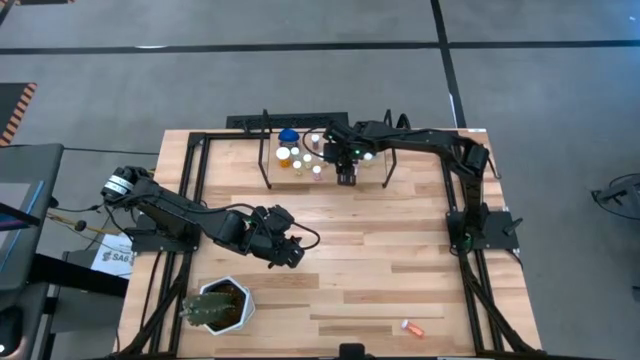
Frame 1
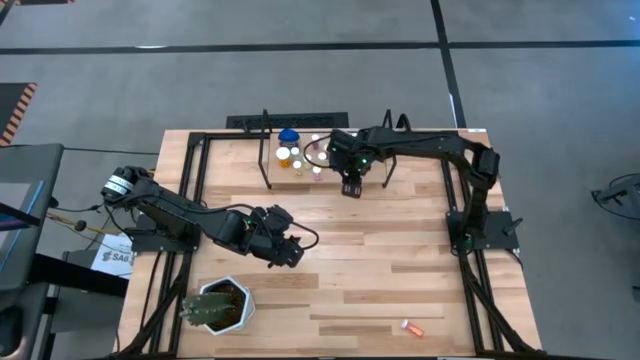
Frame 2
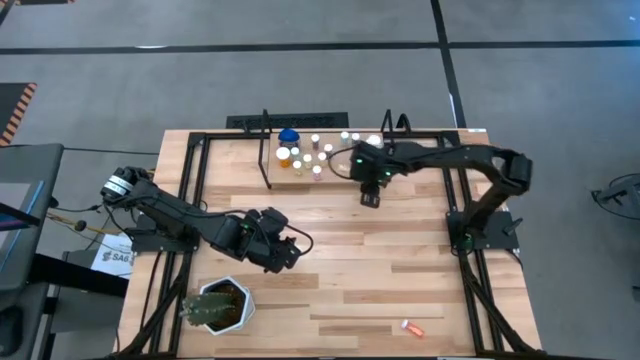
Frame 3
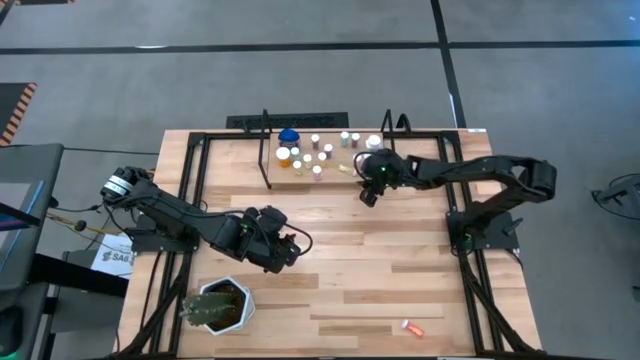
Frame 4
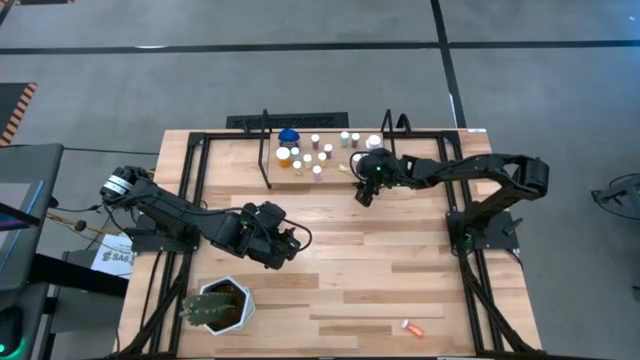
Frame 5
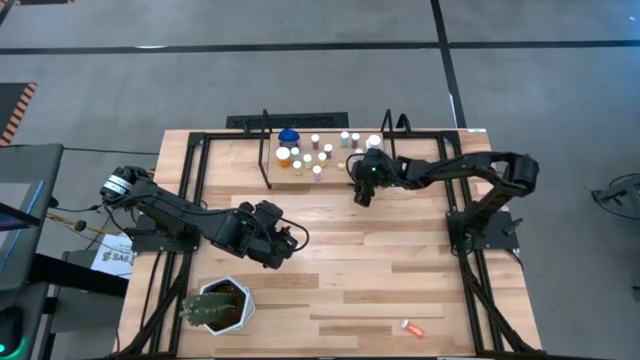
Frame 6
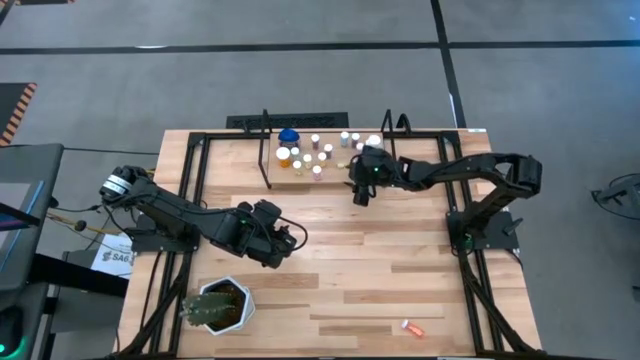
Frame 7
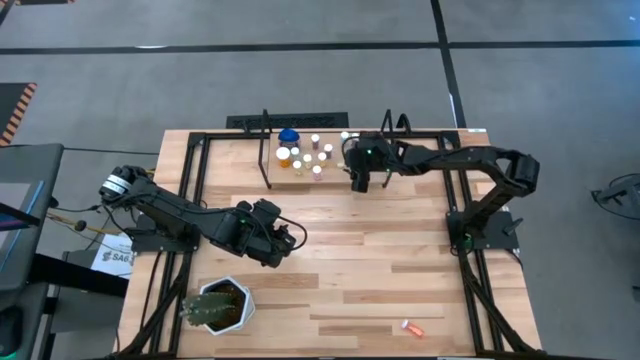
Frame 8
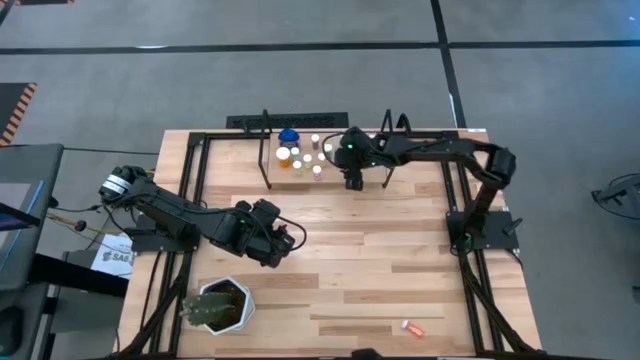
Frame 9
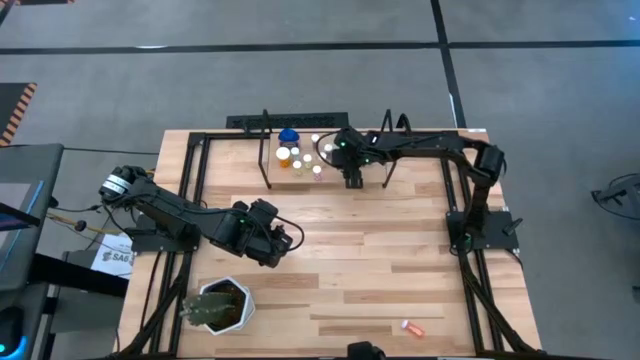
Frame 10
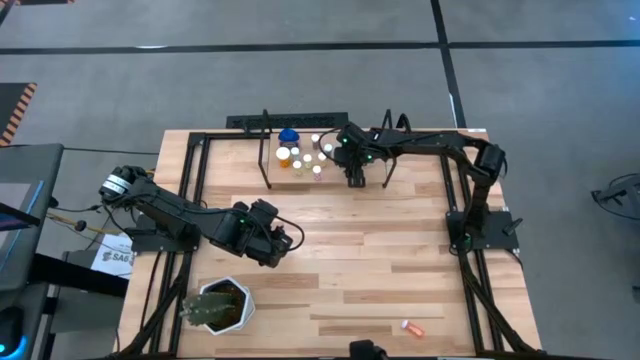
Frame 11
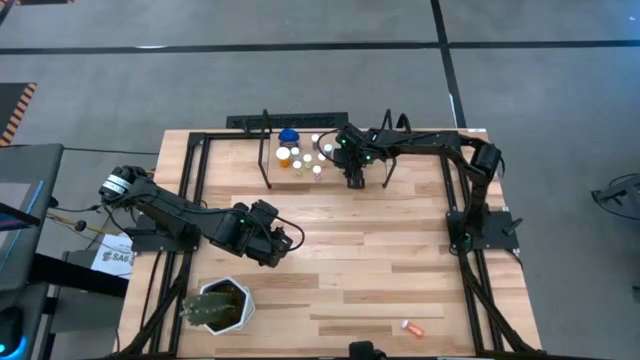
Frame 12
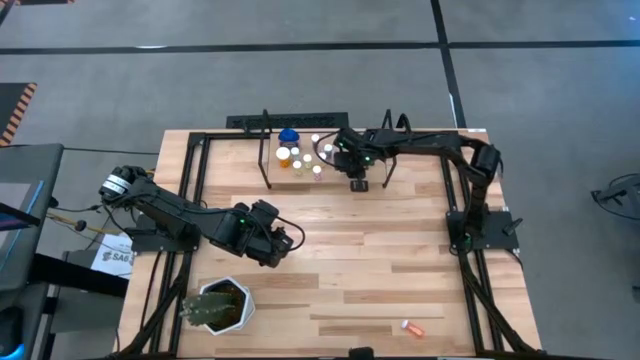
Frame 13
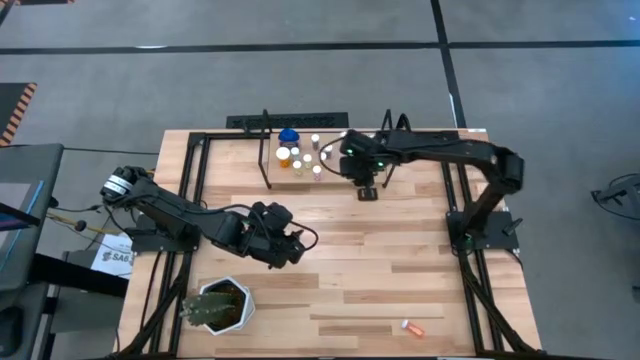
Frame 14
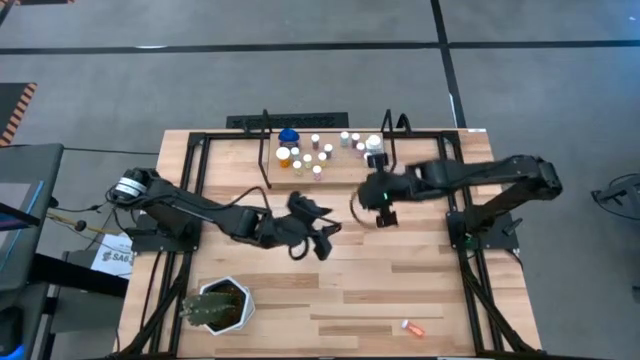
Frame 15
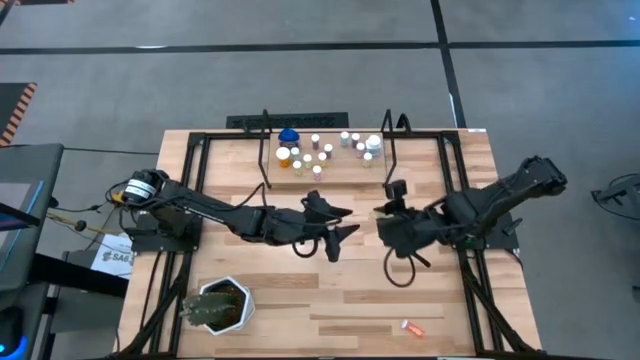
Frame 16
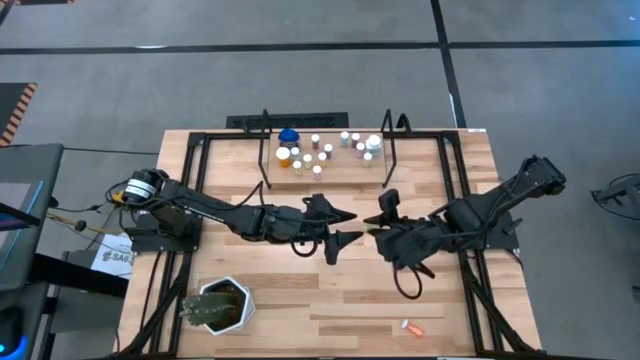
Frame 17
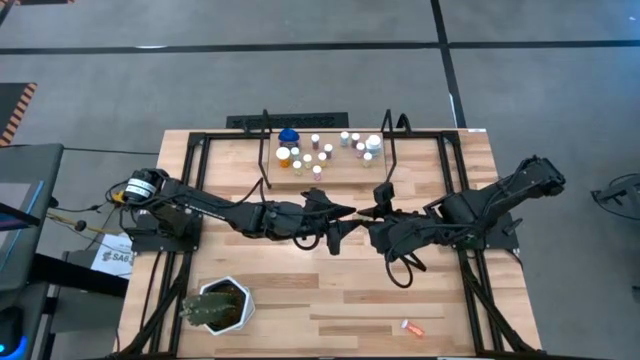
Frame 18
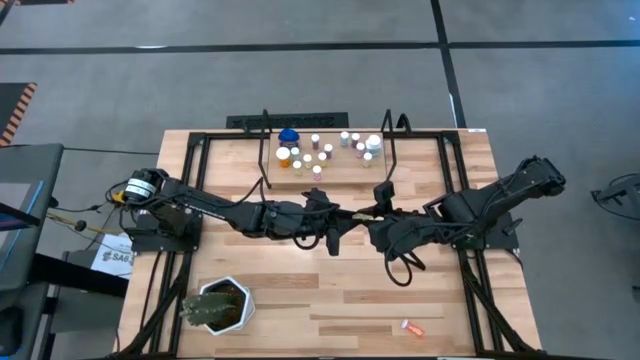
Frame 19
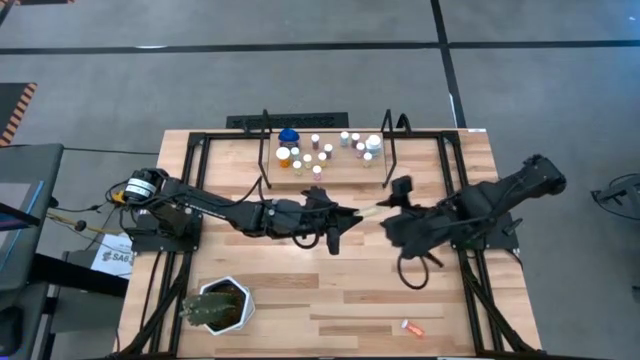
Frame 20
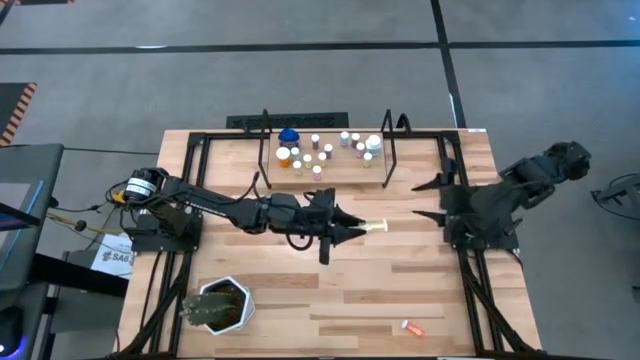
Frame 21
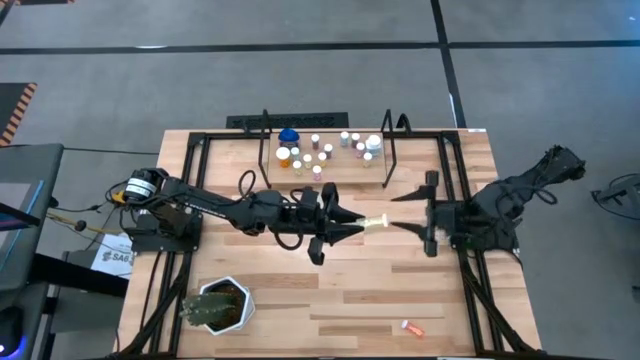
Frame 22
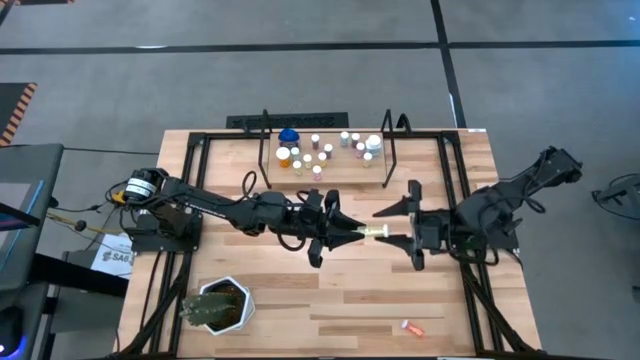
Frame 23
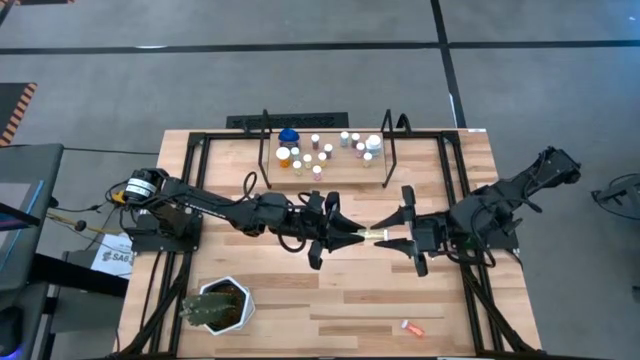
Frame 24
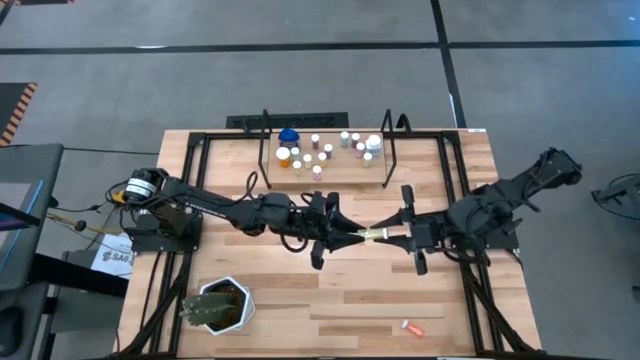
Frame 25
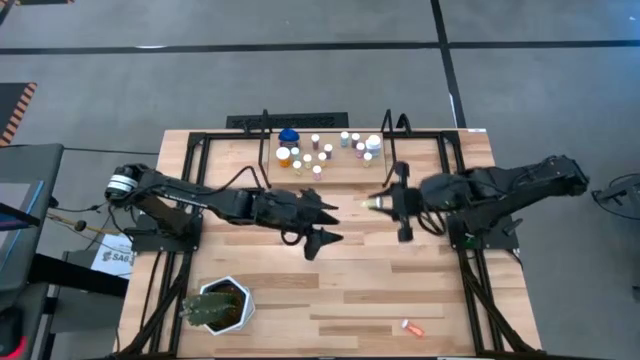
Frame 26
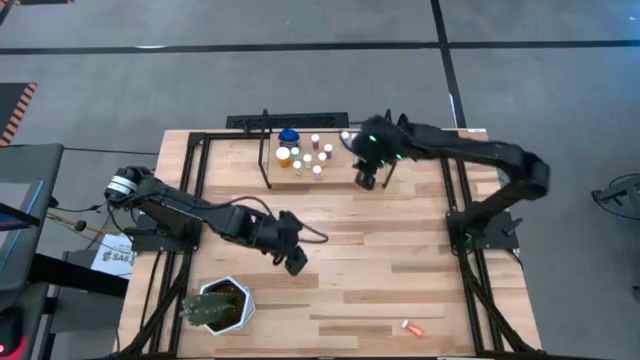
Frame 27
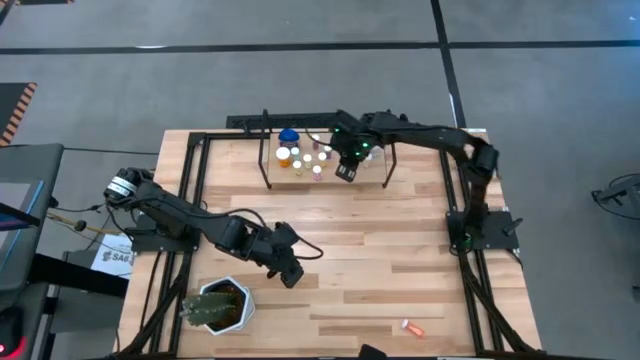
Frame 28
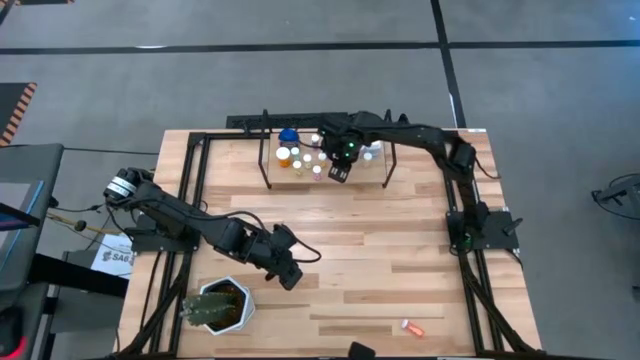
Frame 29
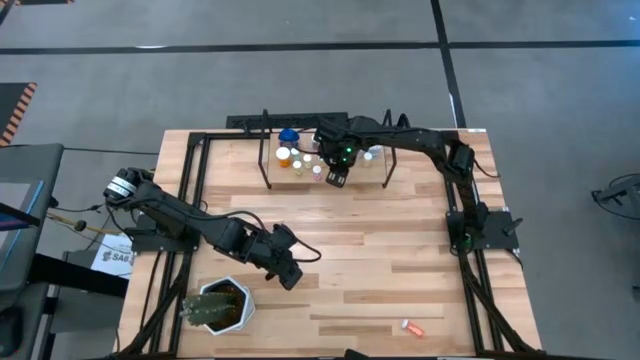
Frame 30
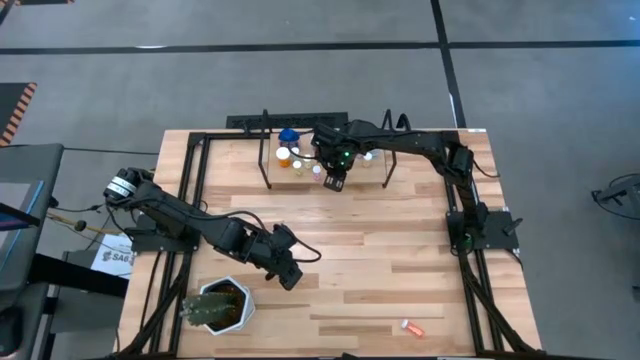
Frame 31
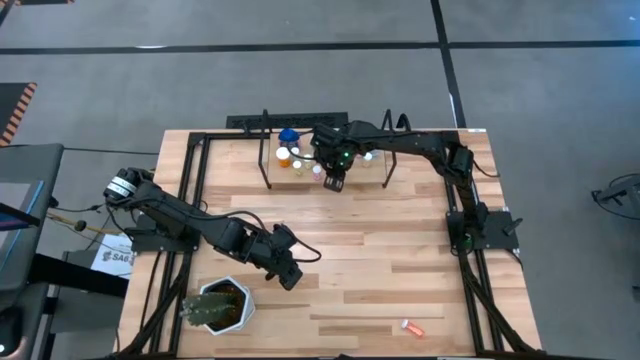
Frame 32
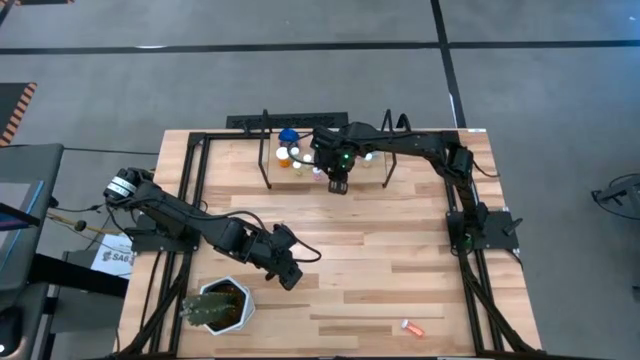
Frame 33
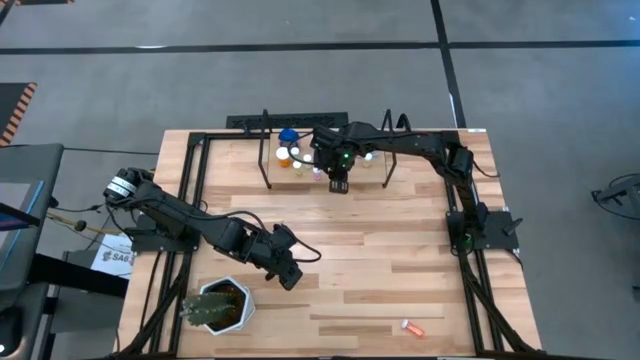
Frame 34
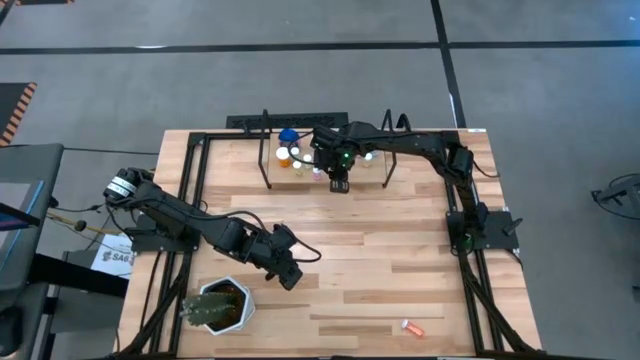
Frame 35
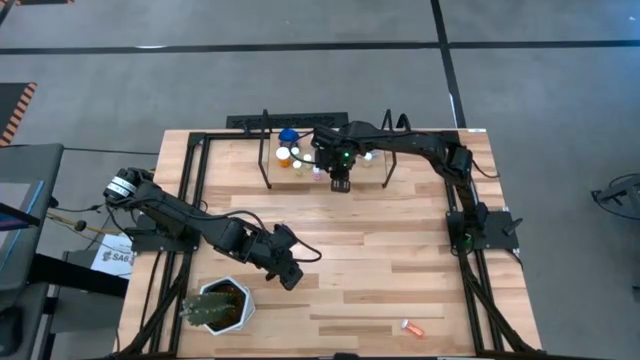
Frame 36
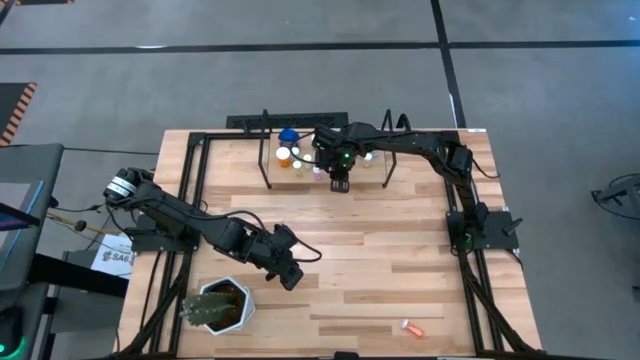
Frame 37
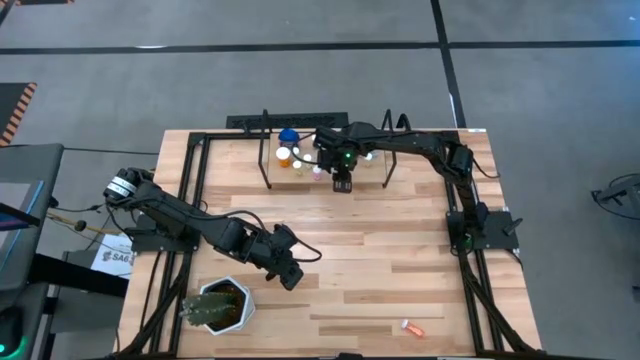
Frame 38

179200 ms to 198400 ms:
Task: Pick and place medicine bottles onto shelf by color
Put the yellow pill bottle on the shelf

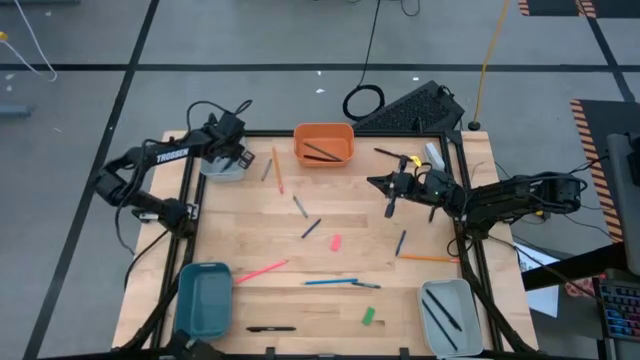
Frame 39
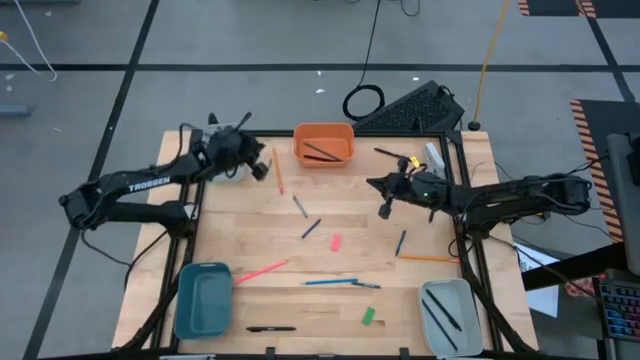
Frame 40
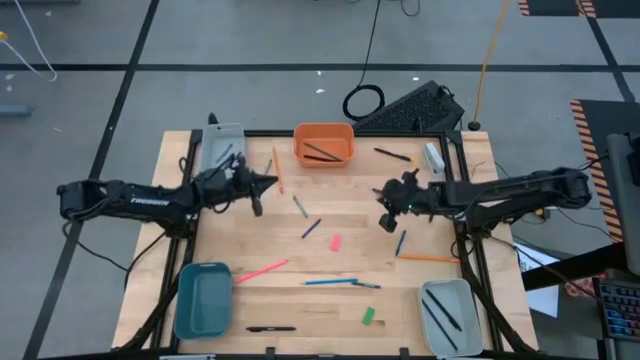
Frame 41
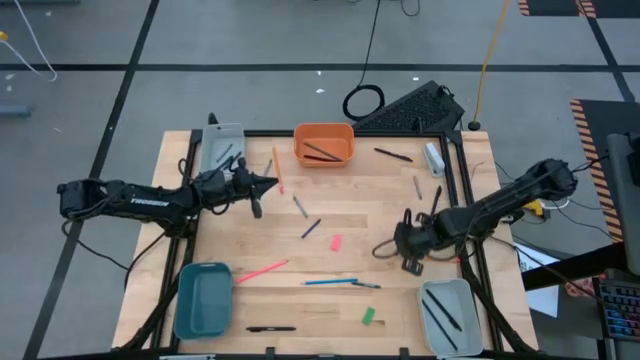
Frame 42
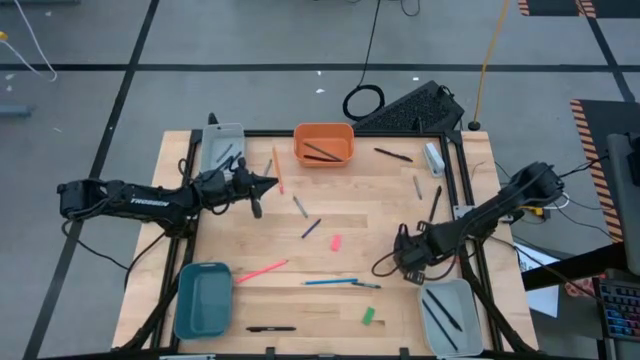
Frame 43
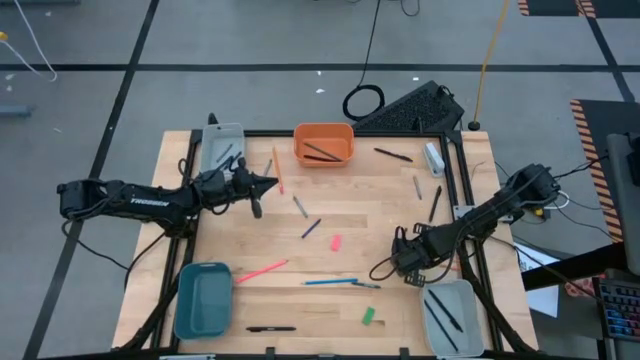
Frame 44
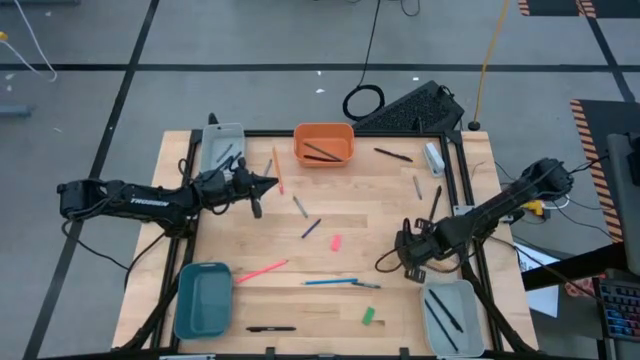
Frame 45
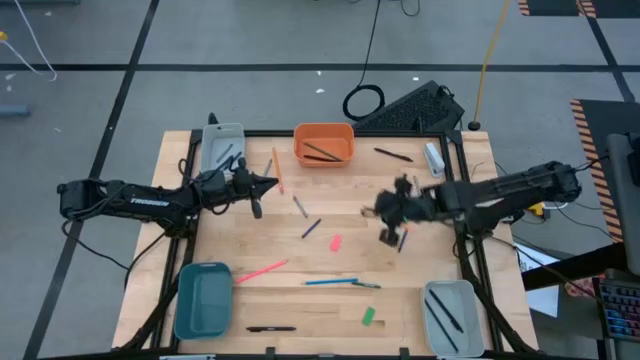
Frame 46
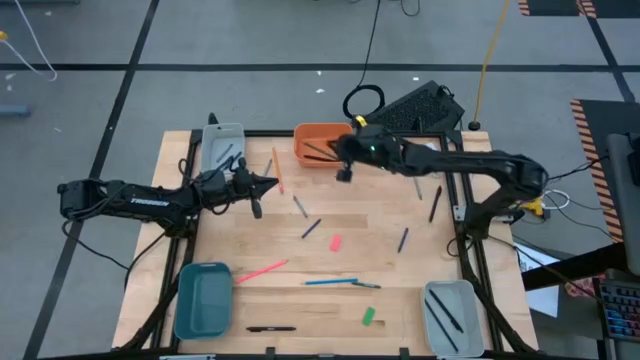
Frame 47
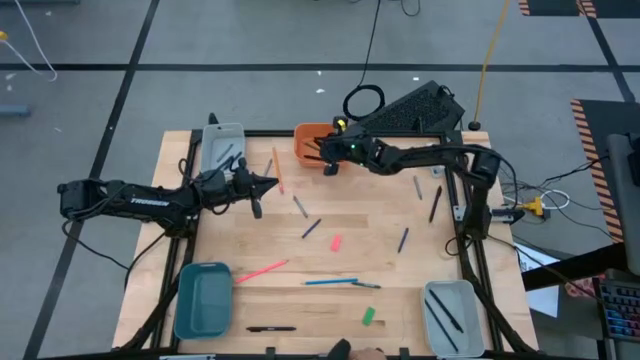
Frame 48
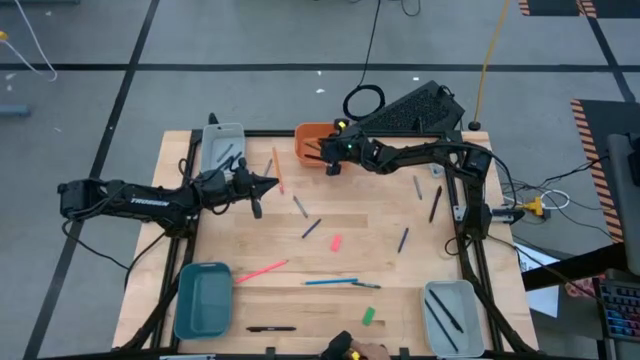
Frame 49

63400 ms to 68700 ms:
Task: Sort crayons/erasers/pens/pencils in bins
Put the orange pencil into the orange bin
